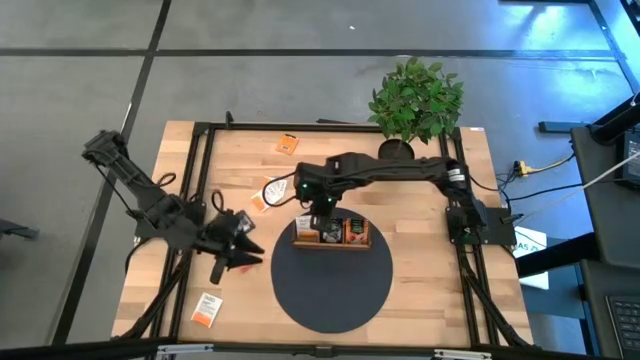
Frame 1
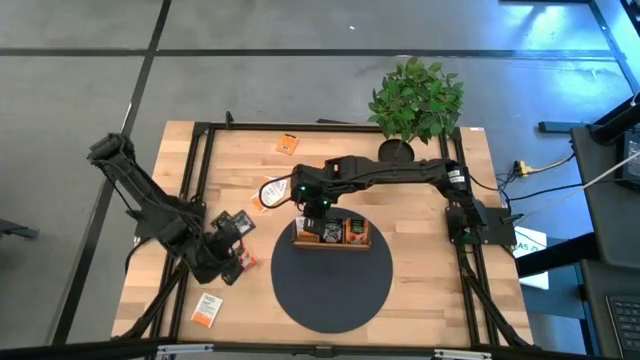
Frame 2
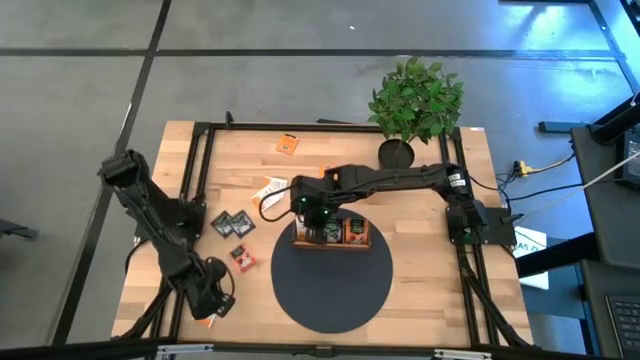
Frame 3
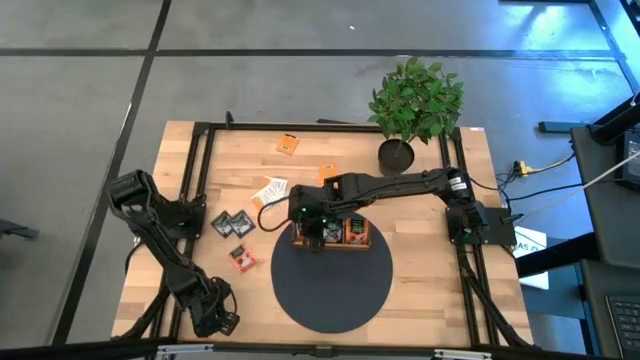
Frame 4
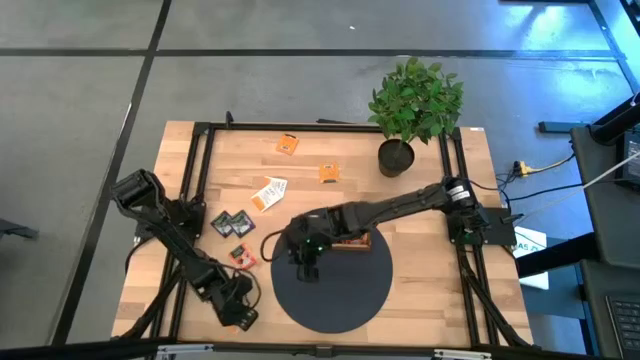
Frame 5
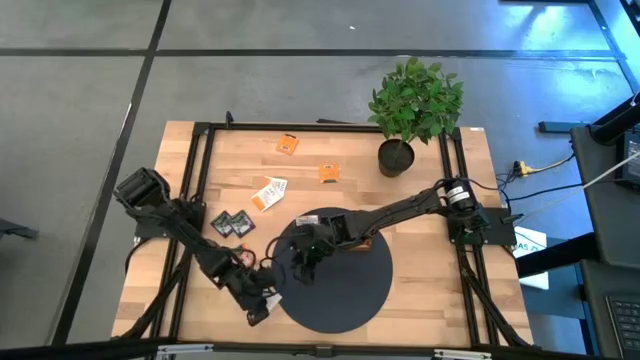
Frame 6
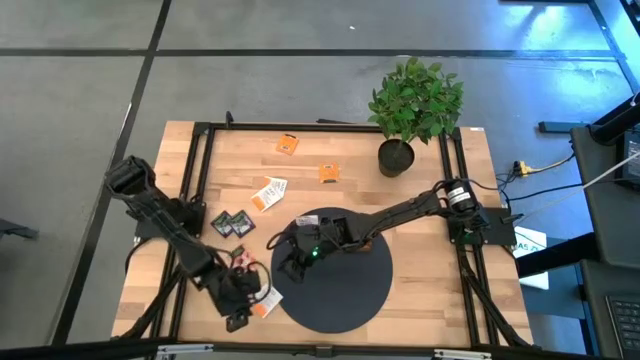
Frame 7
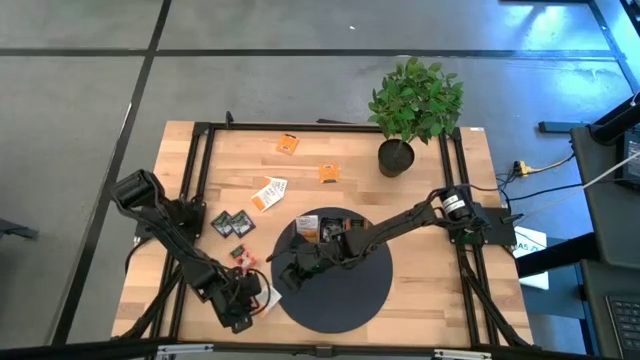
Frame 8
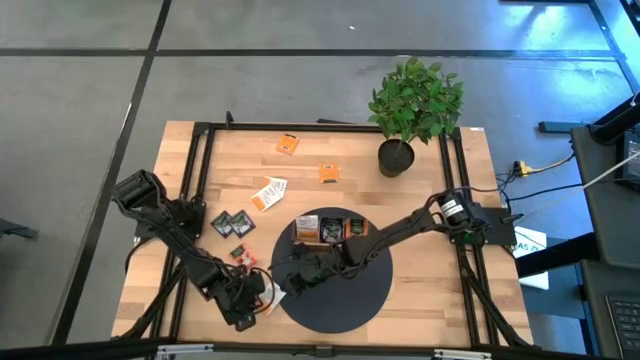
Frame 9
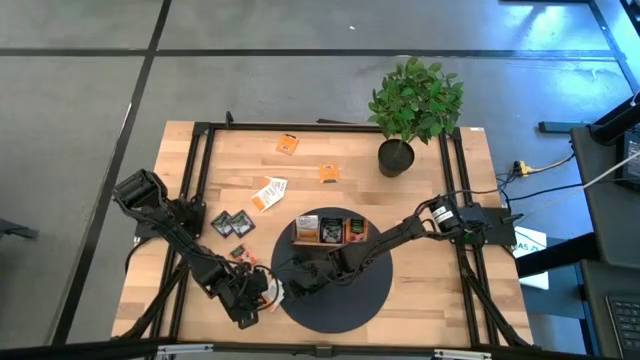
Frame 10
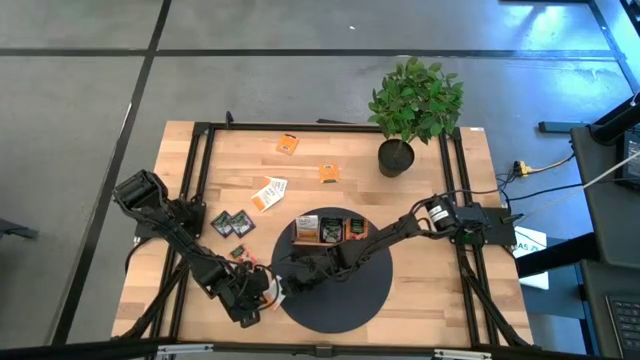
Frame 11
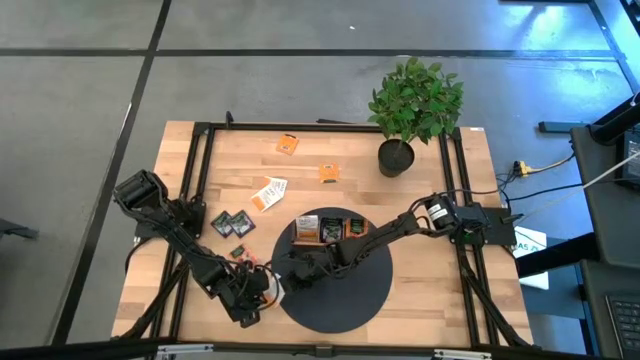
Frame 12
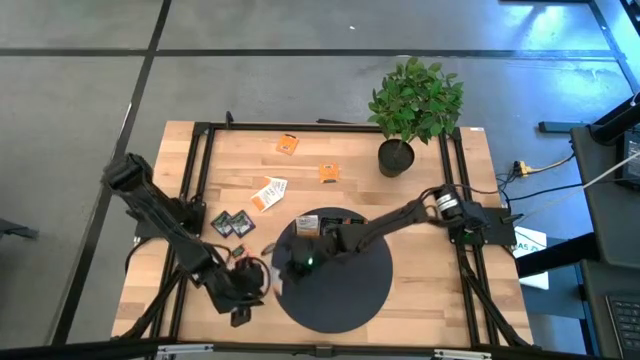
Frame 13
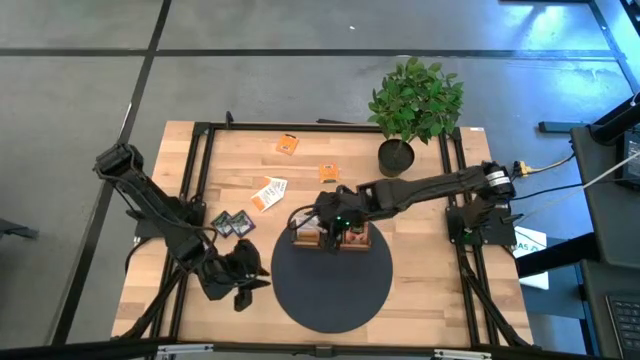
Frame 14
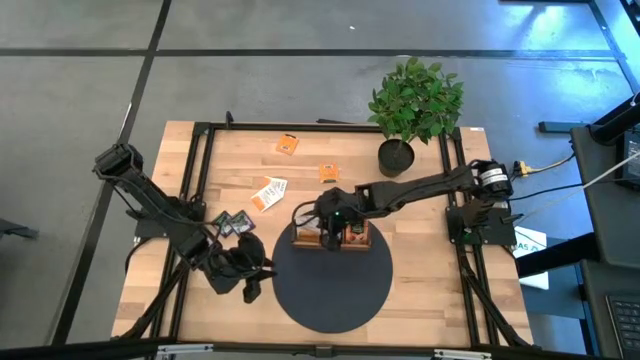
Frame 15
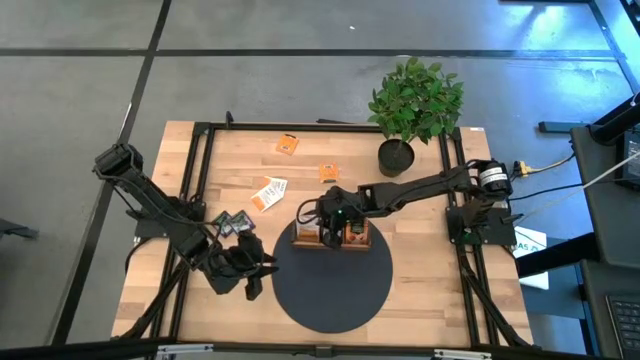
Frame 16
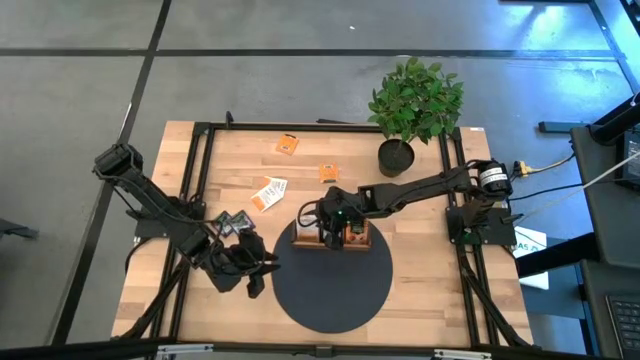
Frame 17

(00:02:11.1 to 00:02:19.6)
Task: Pick & Place Tea
Put the white tea bag into the left section of the wooden organizer

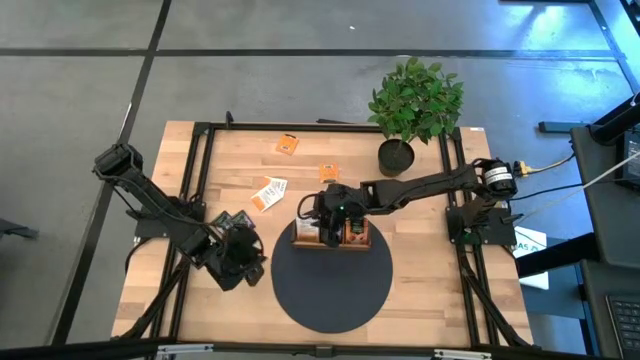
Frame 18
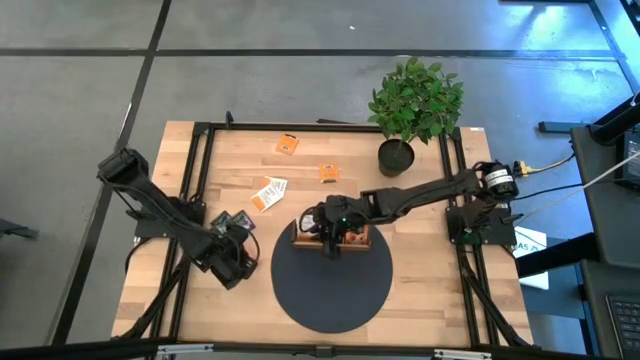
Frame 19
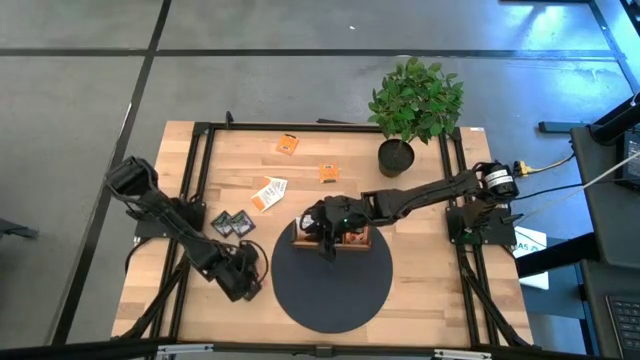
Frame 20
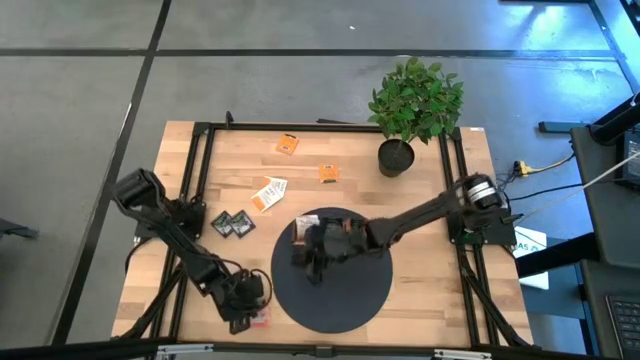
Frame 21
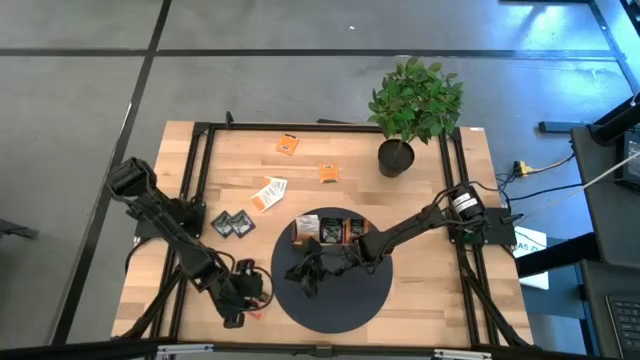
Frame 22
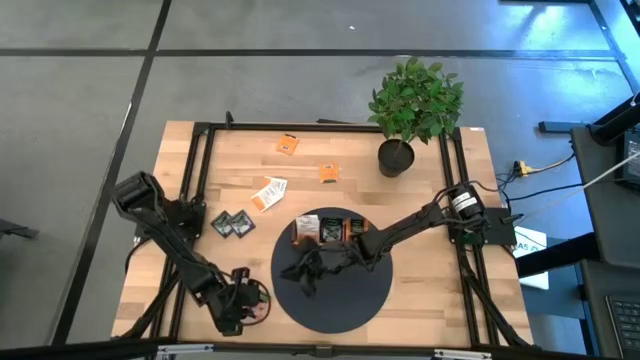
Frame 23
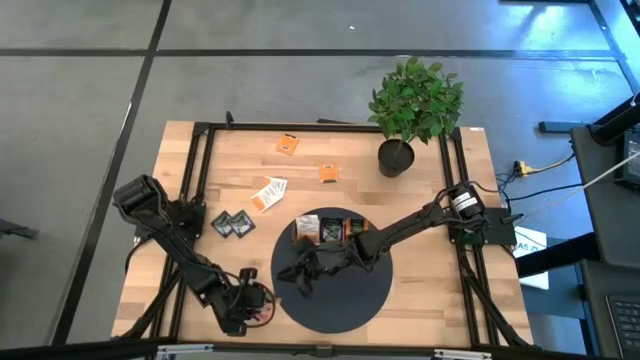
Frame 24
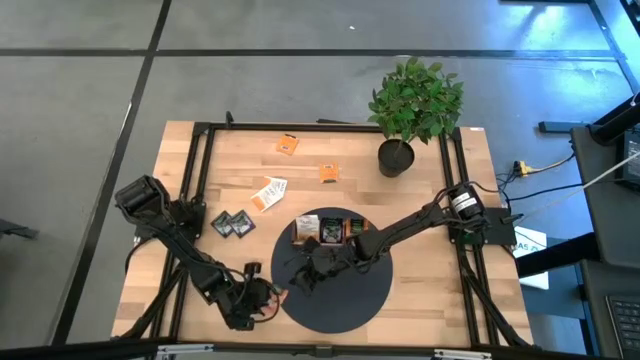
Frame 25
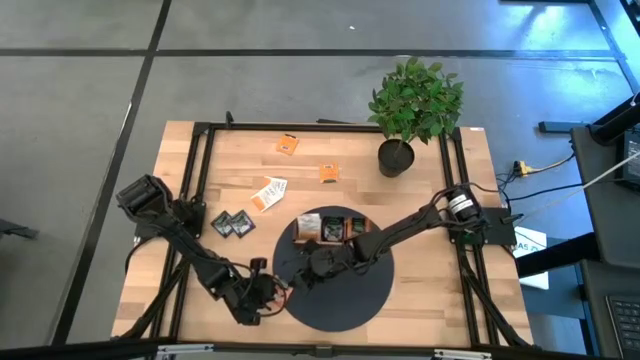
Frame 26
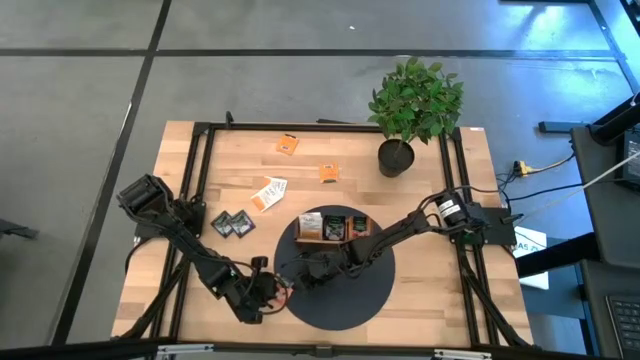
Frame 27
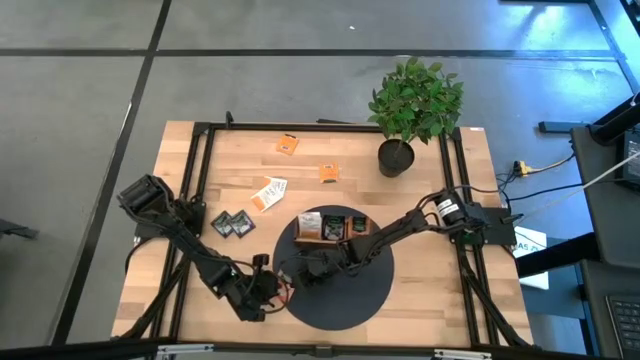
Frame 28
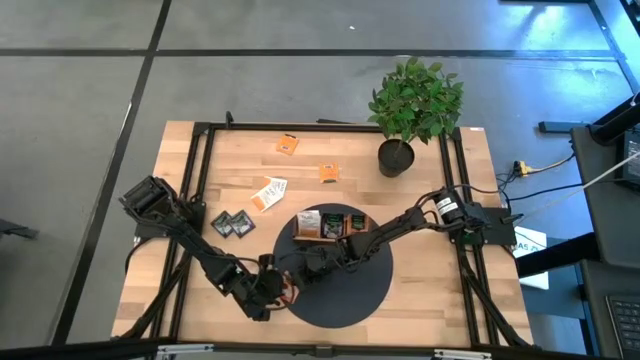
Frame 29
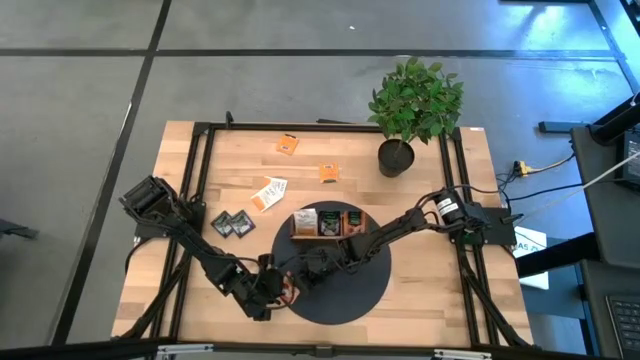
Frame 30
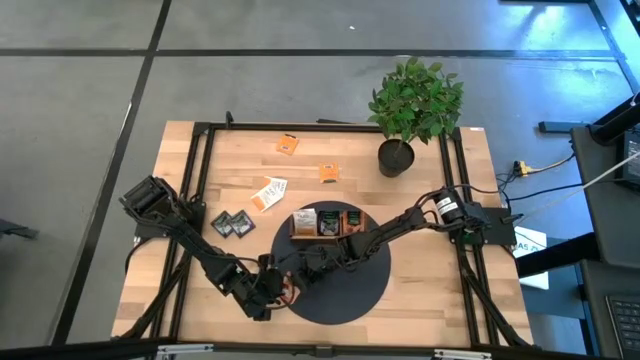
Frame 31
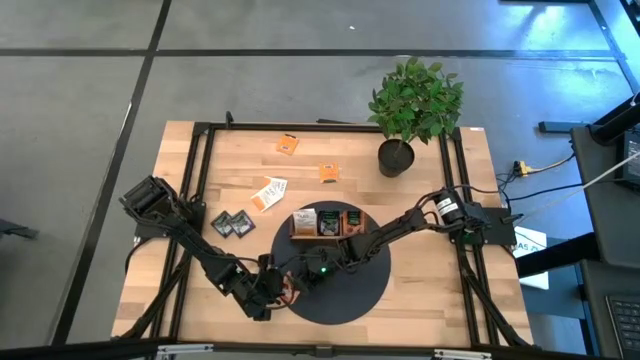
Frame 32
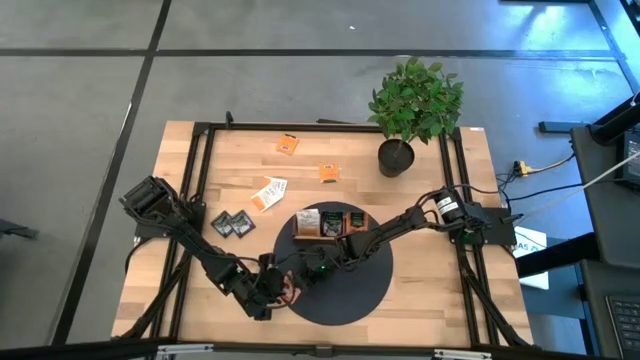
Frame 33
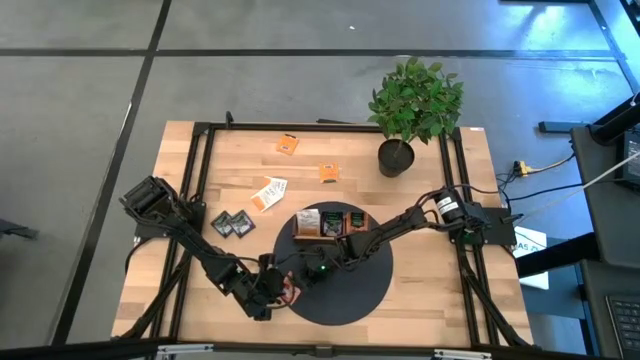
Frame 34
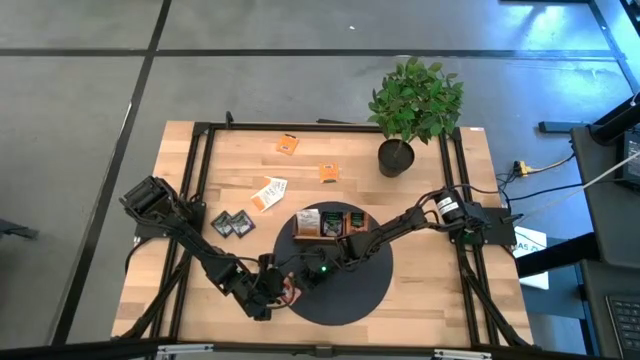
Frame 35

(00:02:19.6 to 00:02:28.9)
Put the orange tea bag into the right section of the wooden organizer

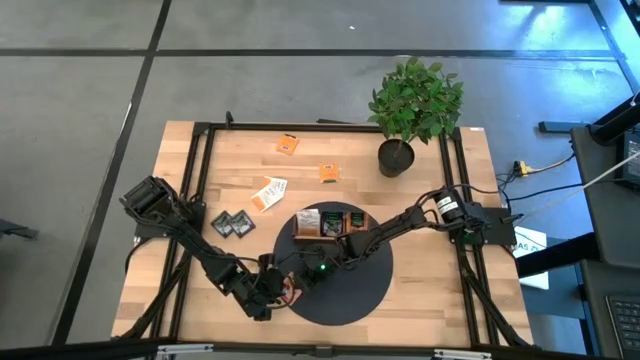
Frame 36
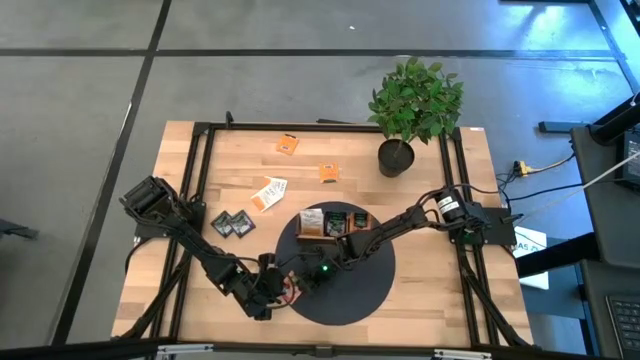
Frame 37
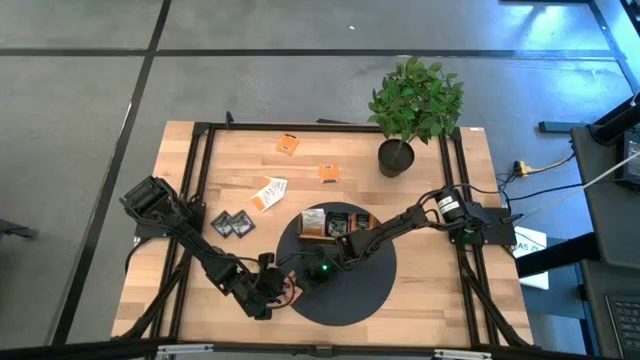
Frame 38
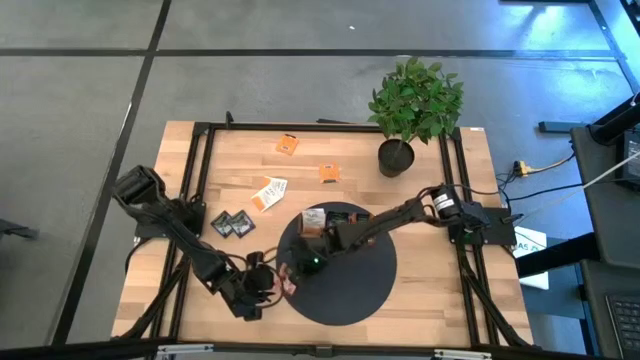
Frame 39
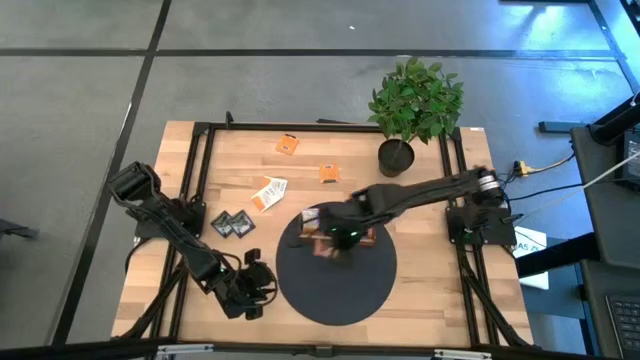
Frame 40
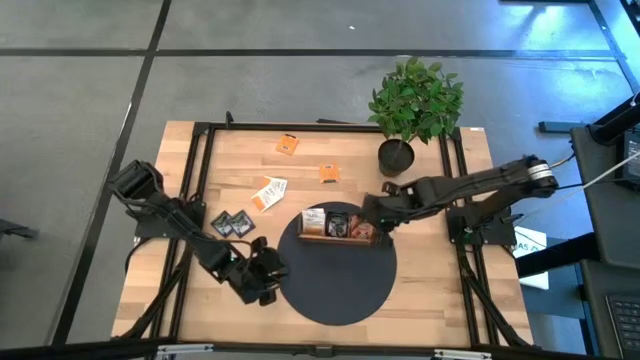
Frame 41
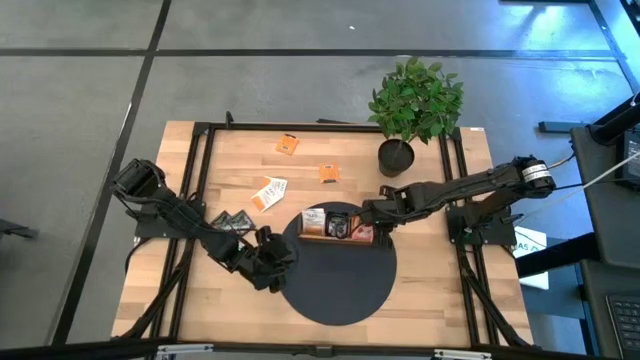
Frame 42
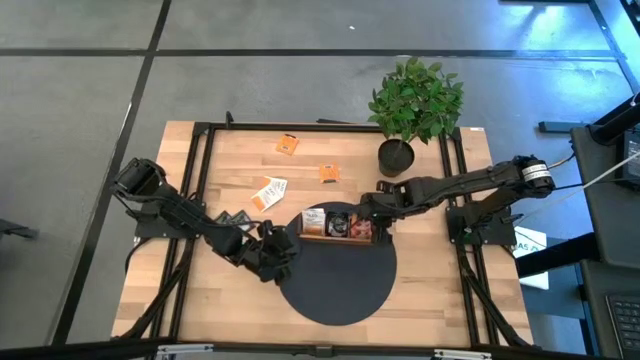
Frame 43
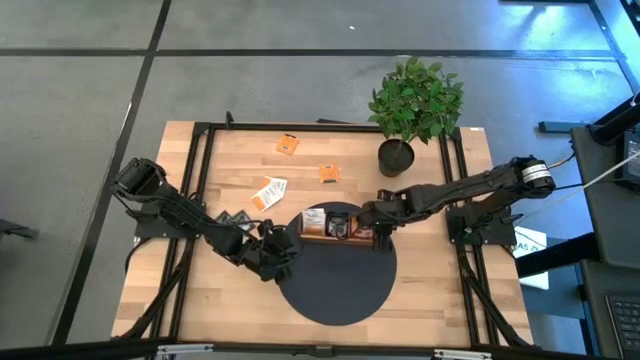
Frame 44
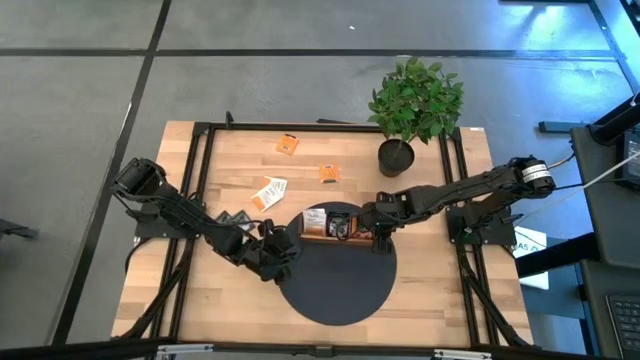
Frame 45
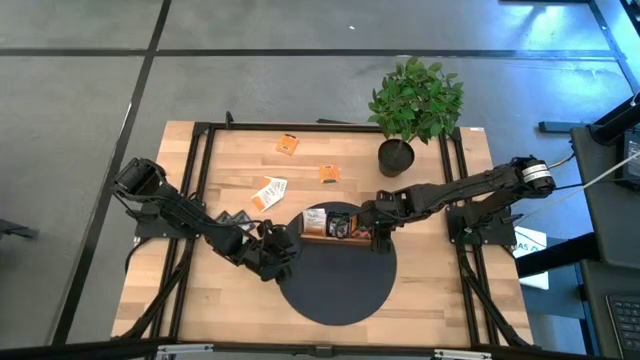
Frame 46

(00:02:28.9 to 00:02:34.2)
Put the orange tea bag into the right section of the wooden organizer
